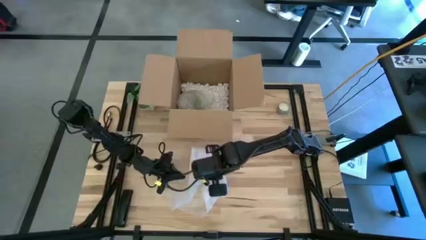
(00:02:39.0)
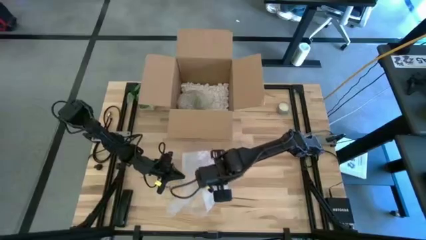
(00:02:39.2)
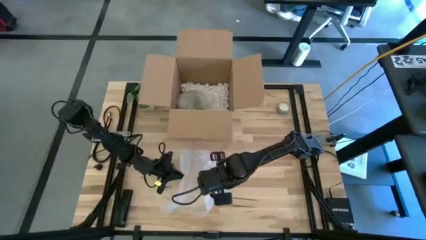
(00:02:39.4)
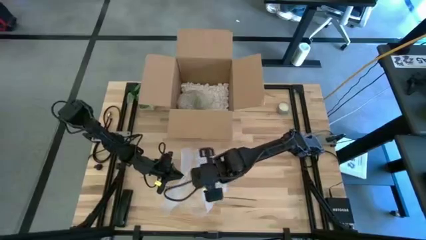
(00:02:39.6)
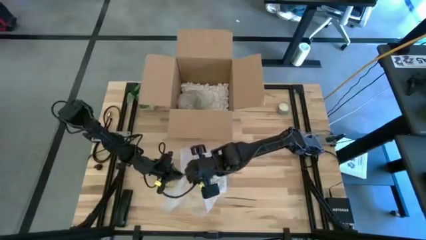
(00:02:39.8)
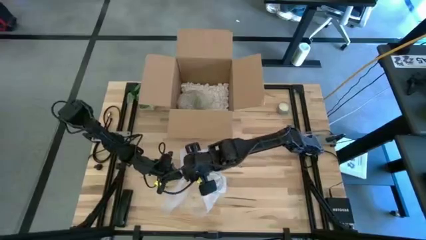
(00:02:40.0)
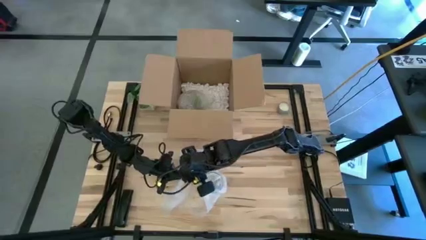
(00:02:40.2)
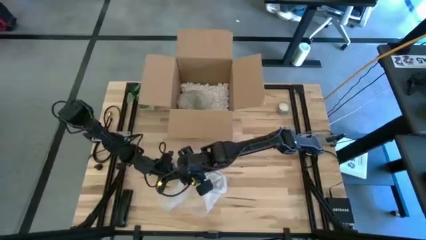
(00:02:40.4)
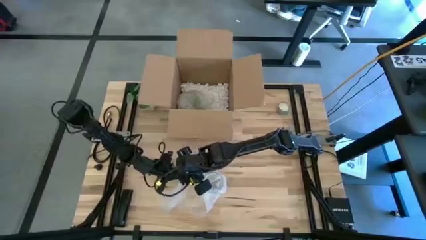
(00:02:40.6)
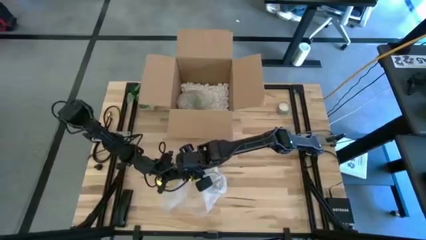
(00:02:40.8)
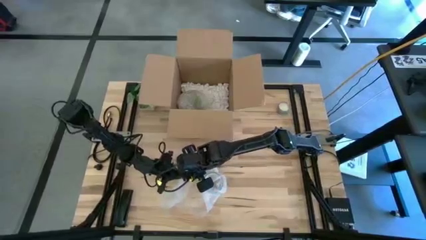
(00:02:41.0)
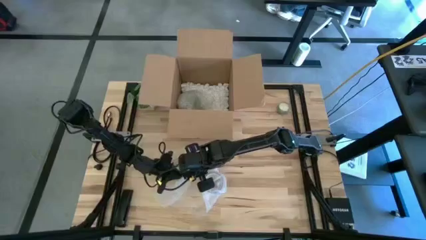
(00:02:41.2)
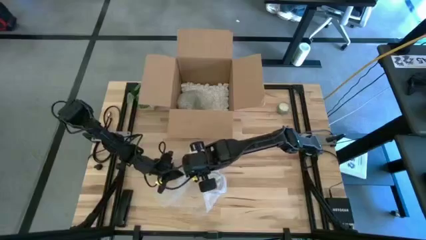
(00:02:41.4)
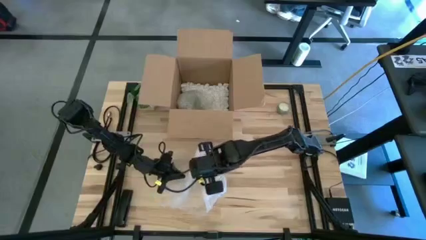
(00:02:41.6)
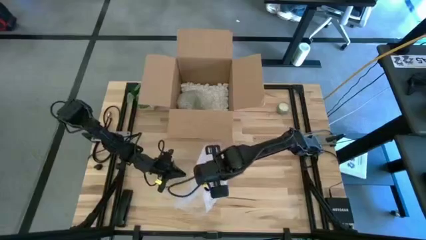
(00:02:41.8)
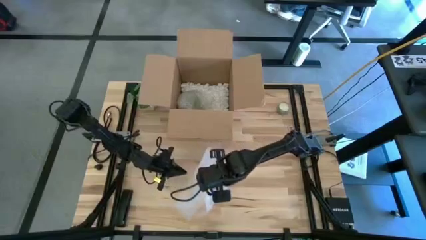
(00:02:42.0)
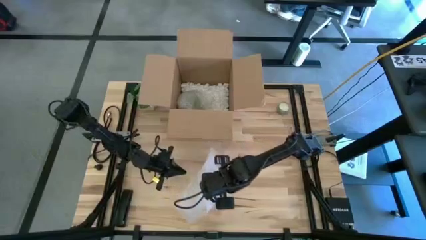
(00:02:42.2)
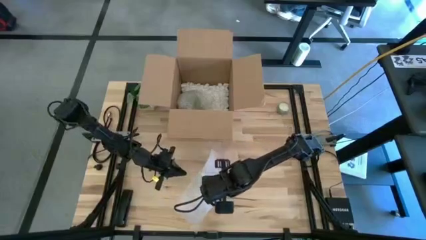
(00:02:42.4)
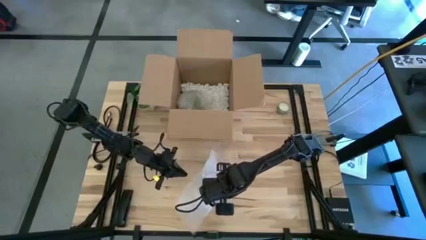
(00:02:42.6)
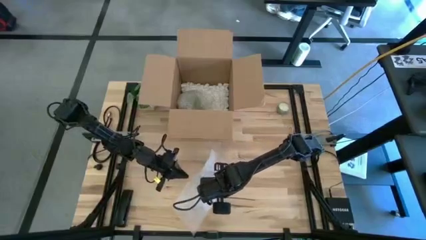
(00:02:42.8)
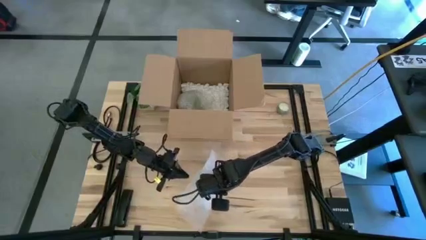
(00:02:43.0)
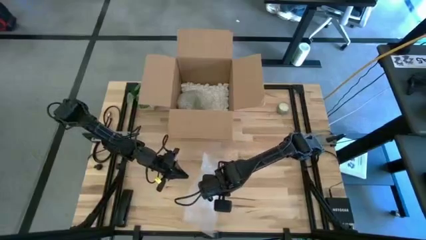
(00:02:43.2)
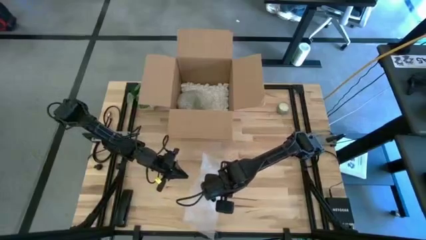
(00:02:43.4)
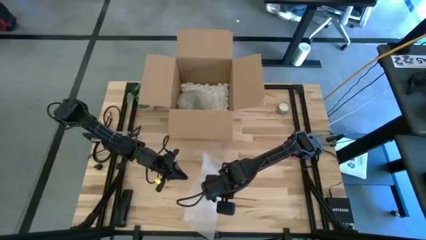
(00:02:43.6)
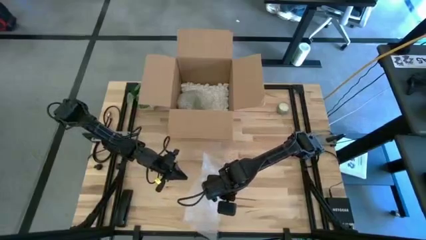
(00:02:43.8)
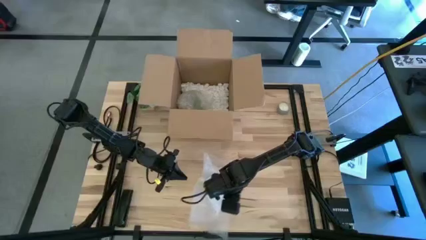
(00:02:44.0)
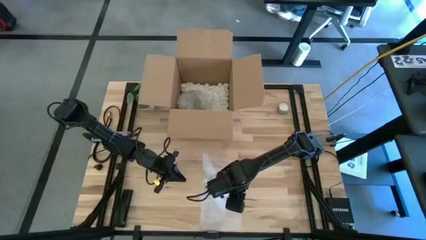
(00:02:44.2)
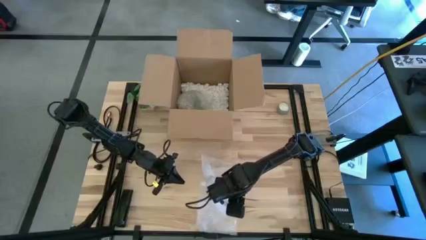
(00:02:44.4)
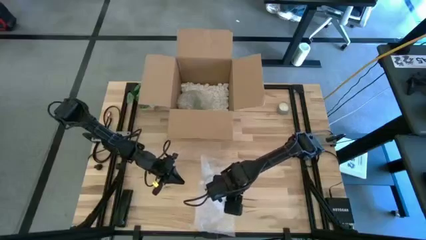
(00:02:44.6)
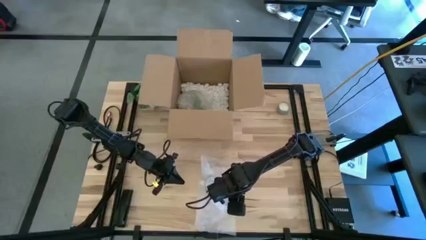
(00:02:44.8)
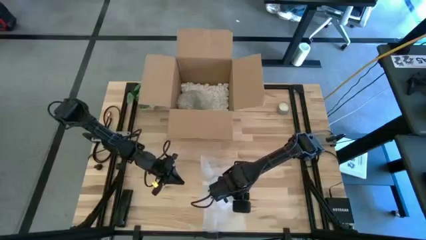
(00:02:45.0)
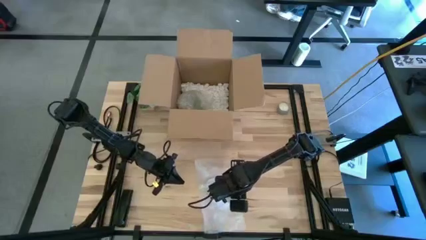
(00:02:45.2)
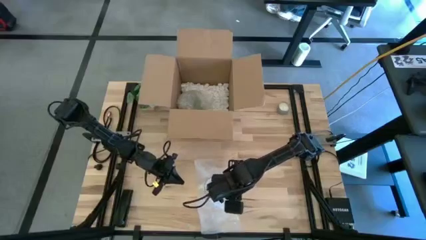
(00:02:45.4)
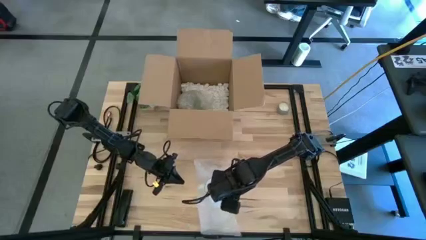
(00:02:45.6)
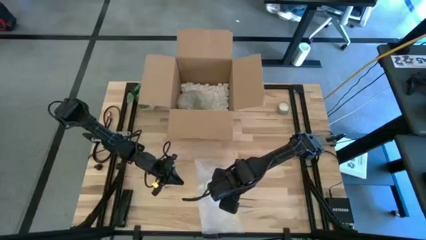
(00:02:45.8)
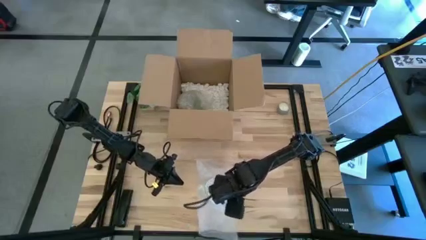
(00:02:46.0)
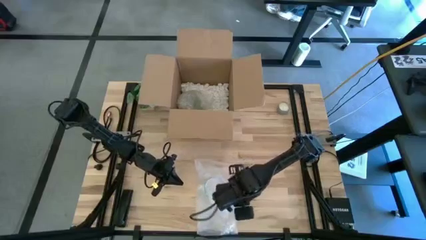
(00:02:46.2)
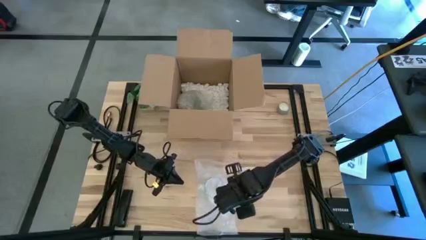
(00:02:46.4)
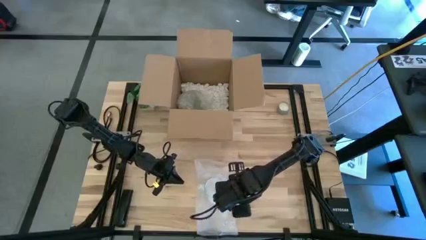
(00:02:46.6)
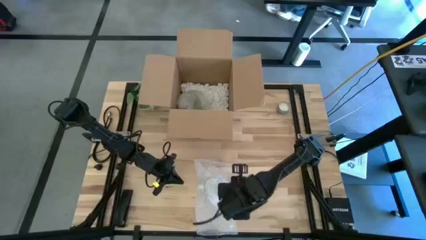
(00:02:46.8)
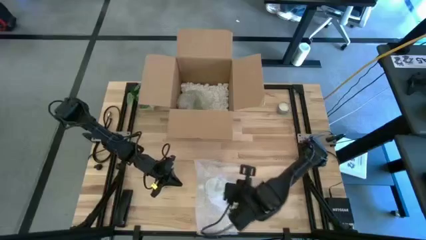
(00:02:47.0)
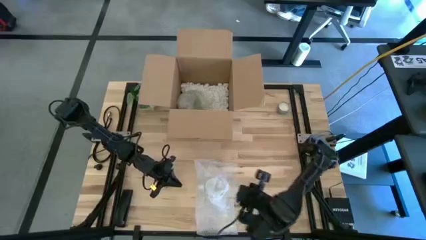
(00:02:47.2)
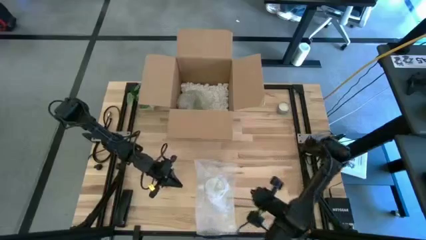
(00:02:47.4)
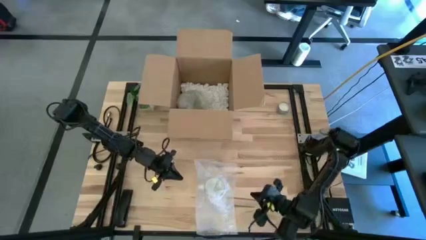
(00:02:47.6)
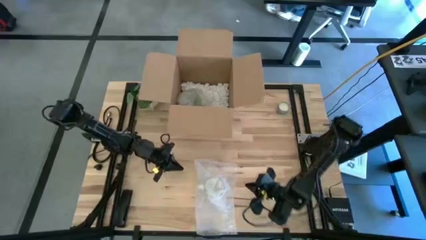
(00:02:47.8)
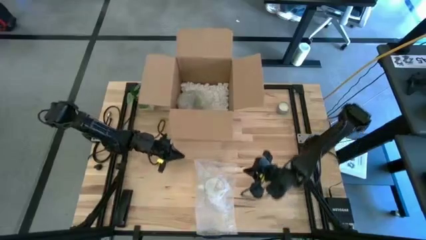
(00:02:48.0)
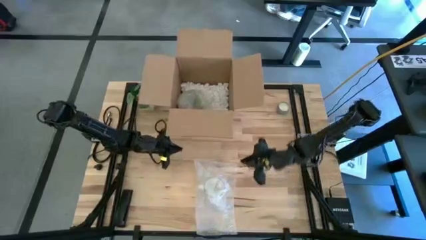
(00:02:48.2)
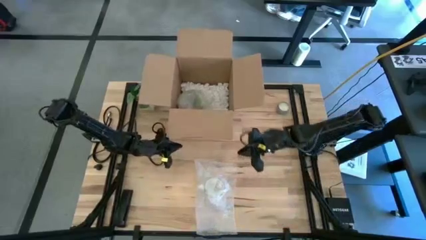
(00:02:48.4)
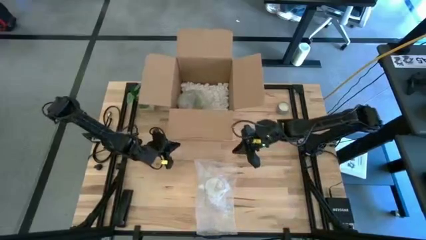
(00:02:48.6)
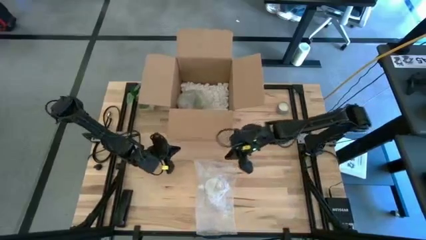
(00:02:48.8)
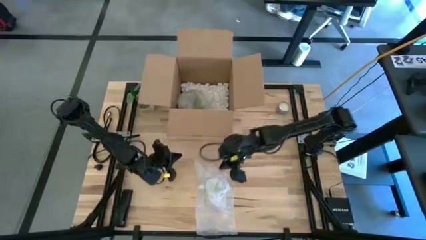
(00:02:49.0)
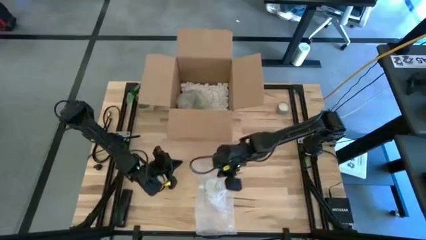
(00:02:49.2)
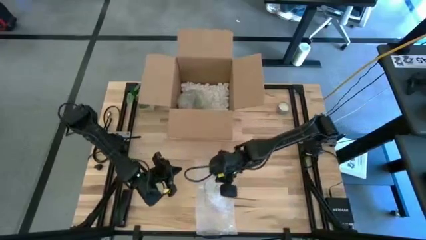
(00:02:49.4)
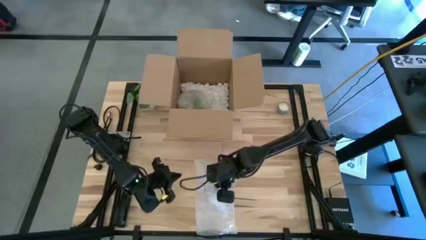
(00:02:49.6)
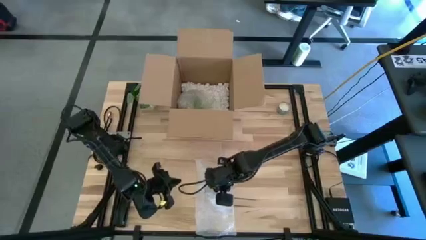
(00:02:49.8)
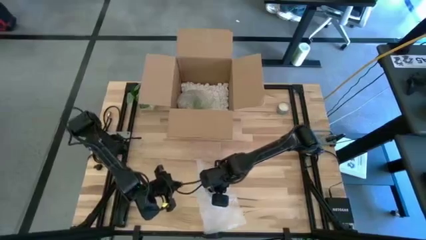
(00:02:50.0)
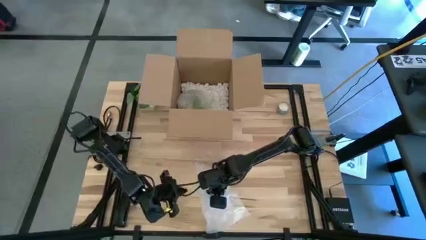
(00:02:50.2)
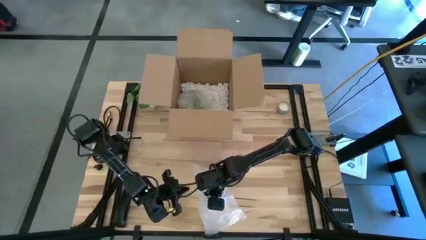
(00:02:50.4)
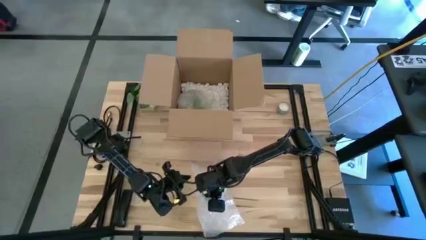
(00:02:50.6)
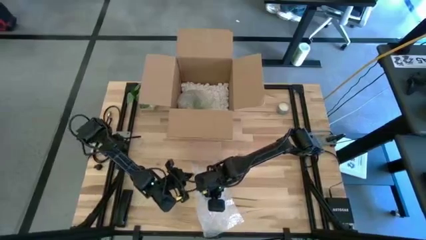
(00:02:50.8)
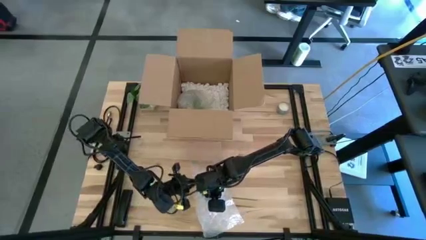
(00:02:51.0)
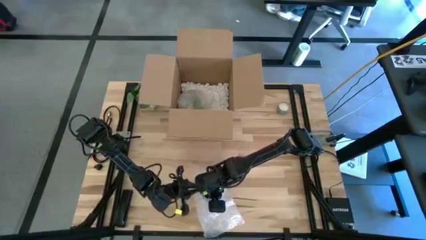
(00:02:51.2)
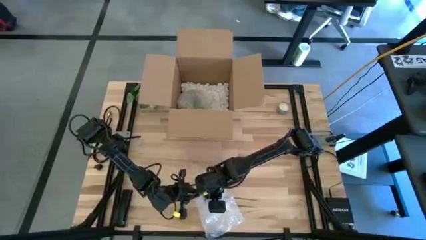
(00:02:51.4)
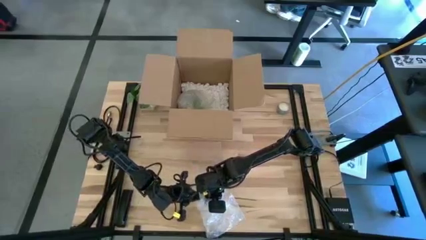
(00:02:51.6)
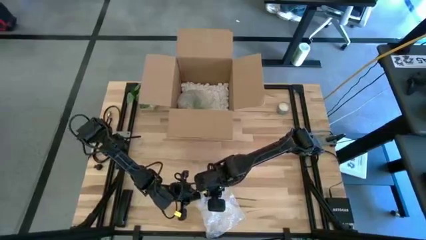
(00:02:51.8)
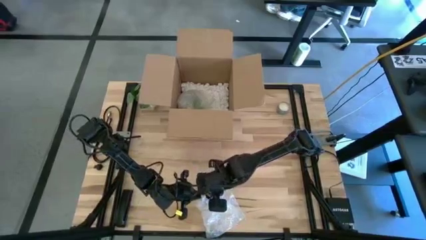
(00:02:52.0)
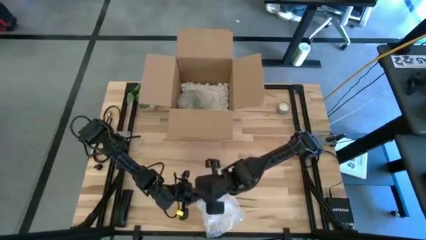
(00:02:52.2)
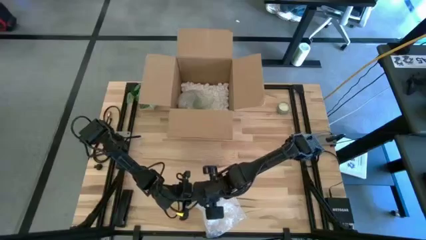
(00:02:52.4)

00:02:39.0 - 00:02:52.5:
Task: wrap mug
Wrap the blue mug with the bubble wrap

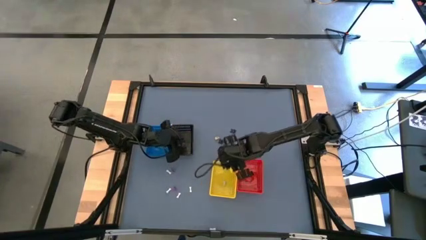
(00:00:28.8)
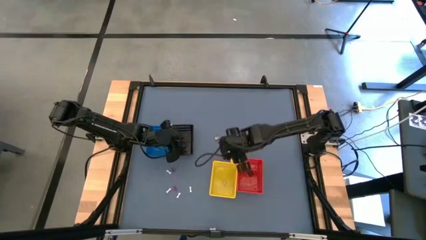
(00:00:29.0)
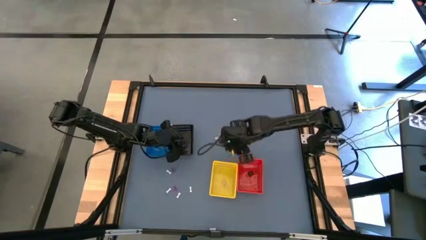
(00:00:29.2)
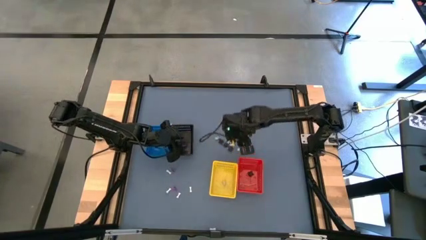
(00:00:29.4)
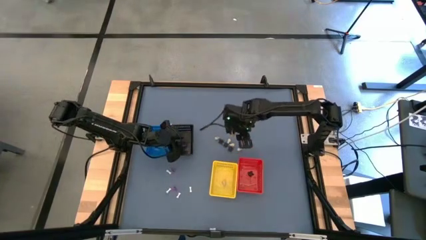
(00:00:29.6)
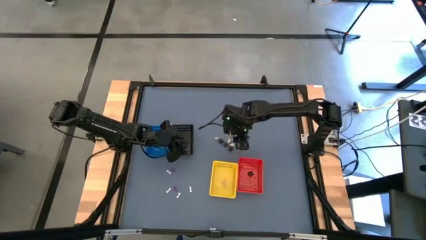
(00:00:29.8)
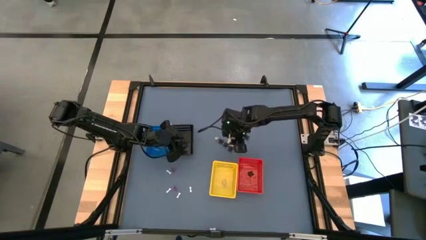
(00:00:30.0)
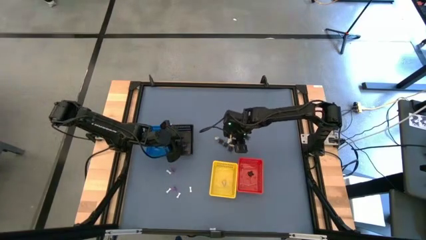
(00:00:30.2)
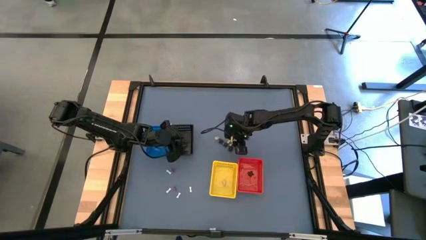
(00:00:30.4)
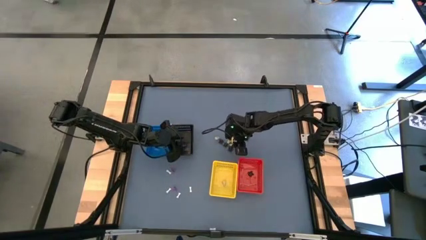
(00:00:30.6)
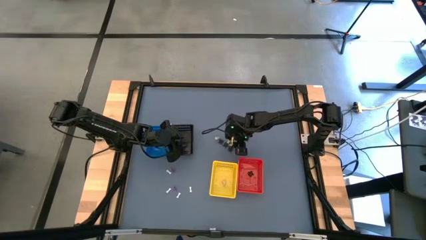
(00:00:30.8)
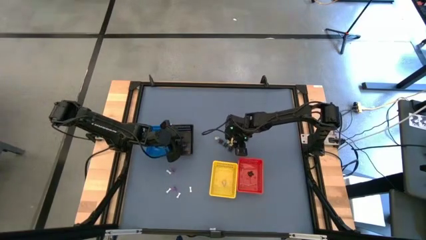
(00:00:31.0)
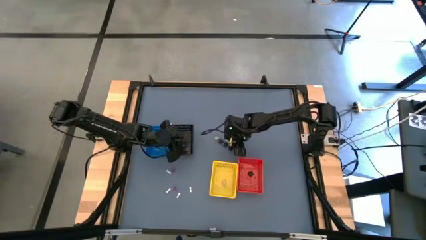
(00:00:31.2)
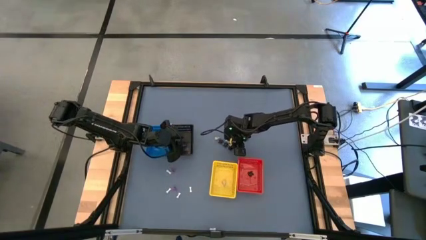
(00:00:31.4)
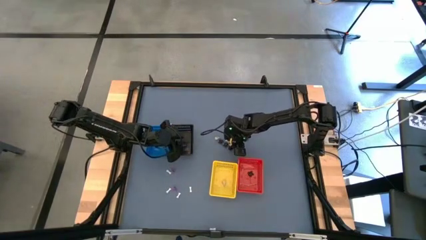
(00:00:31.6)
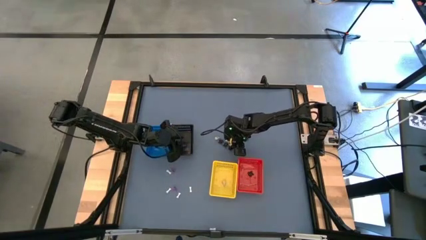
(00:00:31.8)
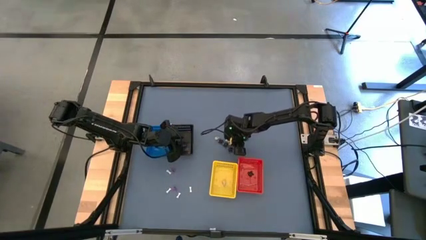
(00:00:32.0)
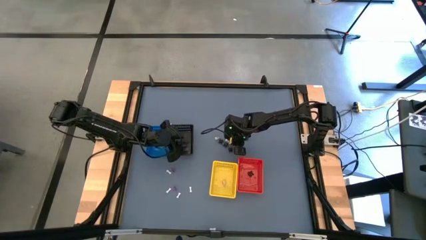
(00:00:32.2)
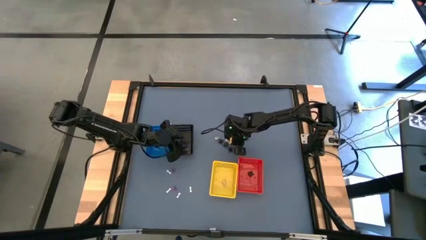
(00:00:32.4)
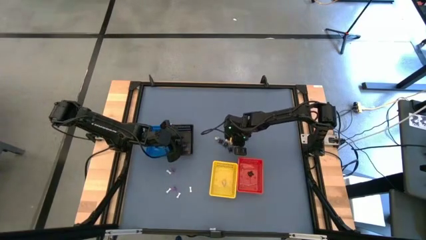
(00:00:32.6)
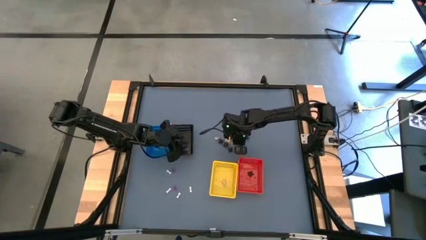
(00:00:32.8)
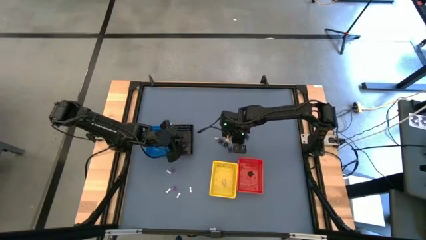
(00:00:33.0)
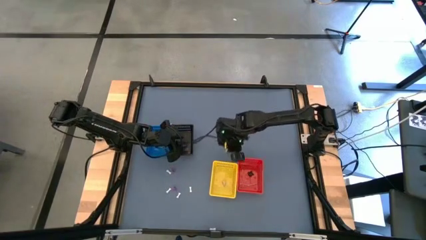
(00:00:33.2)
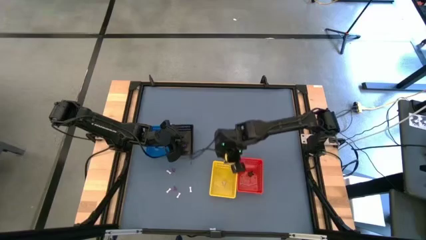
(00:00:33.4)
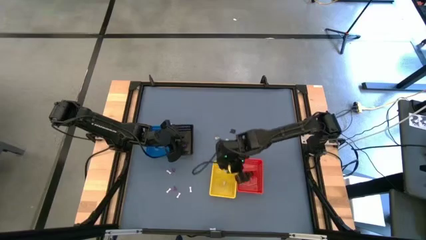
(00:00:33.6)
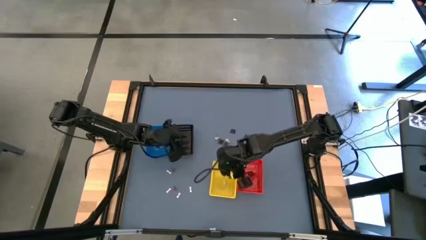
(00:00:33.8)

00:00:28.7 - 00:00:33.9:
Task: Sort Halloween decoration
Put the skull toy into the yellow bin
